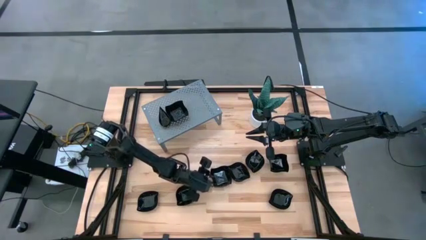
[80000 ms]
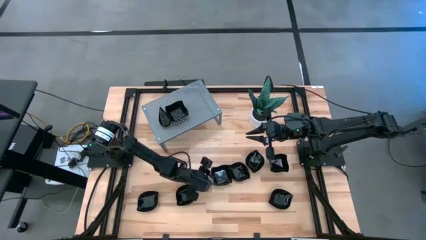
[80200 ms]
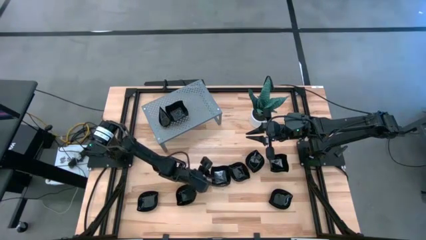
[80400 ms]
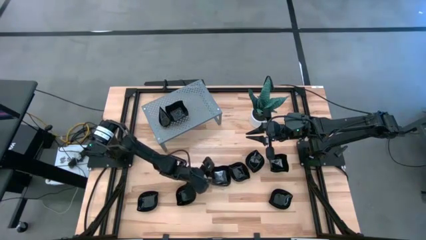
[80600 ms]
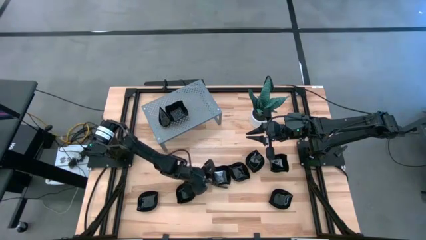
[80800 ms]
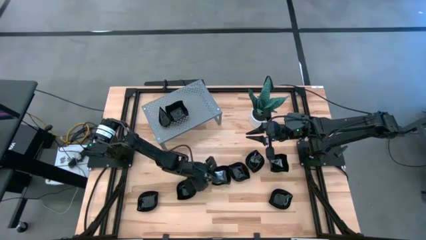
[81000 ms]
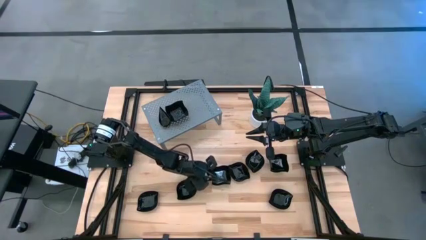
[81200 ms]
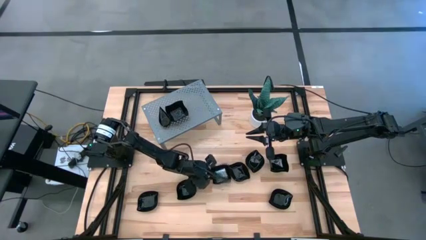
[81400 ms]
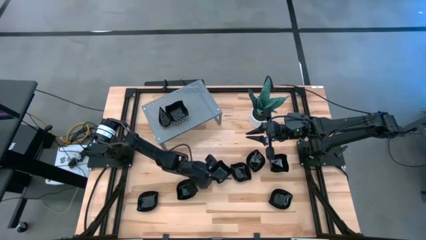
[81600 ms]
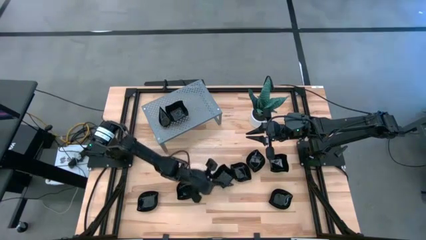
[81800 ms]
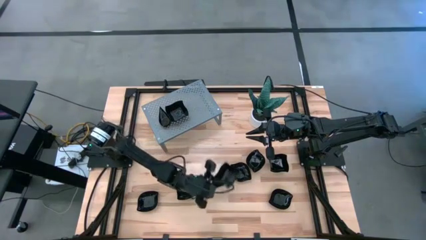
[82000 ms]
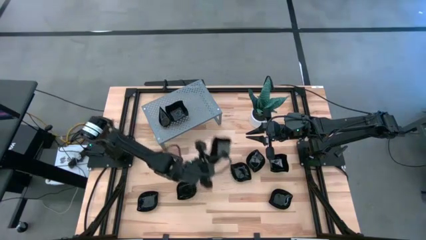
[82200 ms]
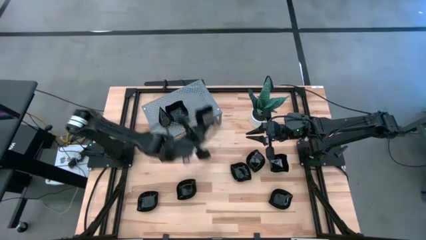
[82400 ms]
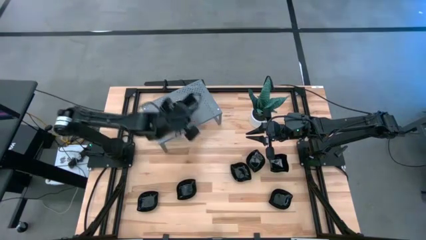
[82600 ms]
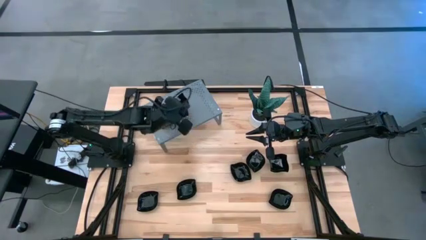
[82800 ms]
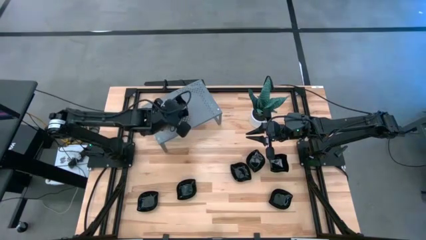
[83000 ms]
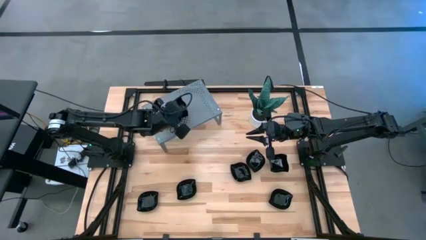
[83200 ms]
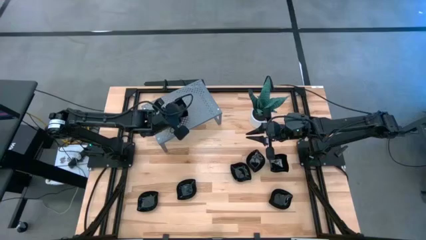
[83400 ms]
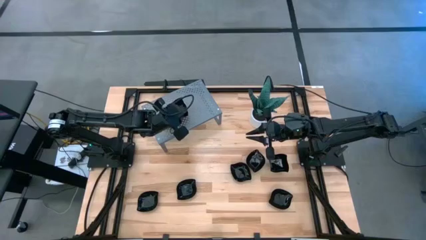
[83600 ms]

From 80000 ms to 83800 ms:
Task: Pick & Place Mini shaped plates
Stack the black distorted square plate on the black distorted square plate on the shelf

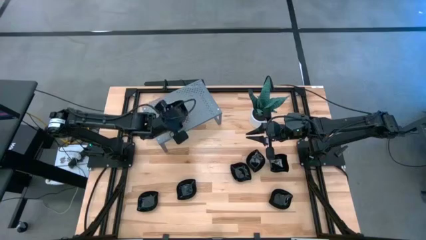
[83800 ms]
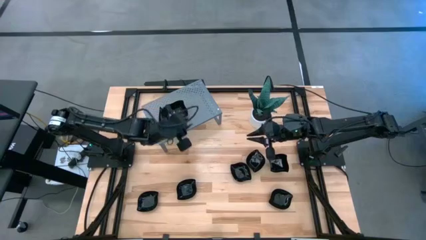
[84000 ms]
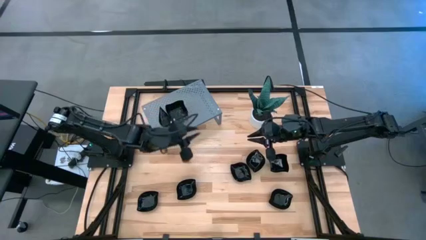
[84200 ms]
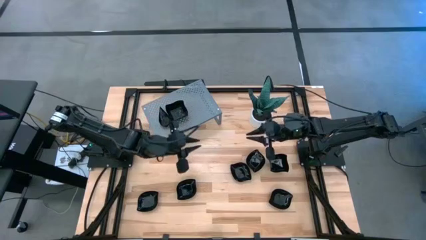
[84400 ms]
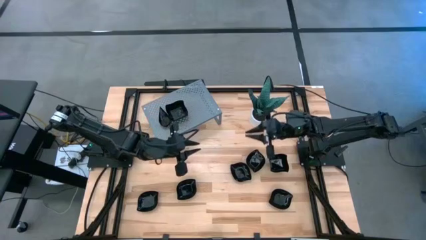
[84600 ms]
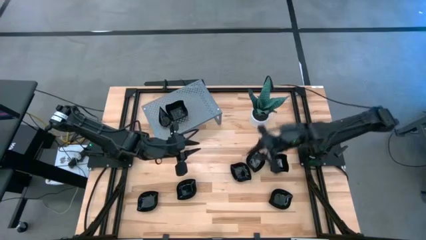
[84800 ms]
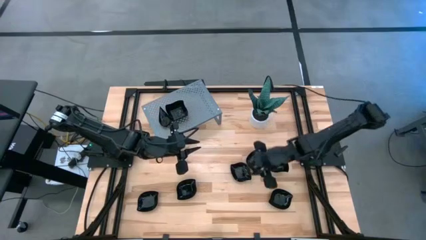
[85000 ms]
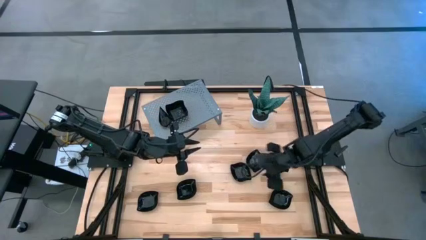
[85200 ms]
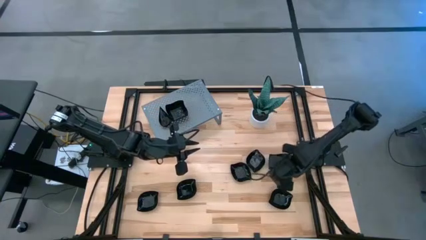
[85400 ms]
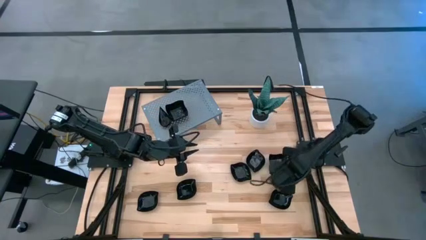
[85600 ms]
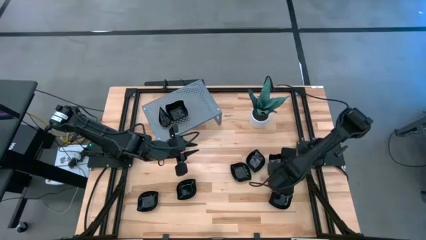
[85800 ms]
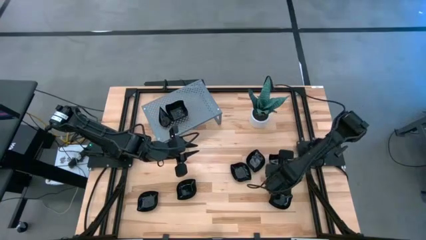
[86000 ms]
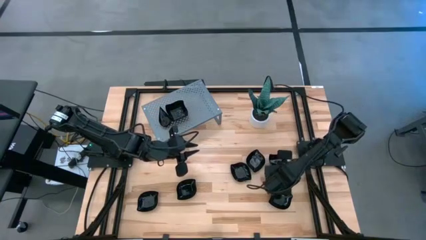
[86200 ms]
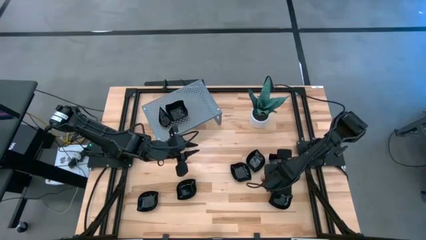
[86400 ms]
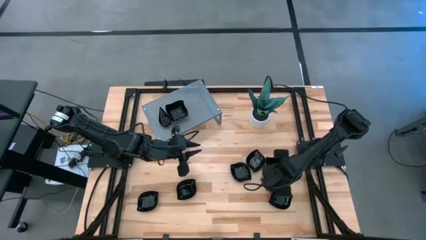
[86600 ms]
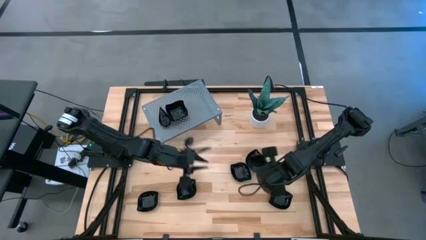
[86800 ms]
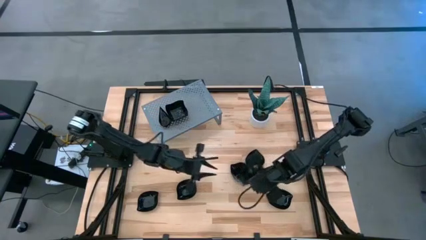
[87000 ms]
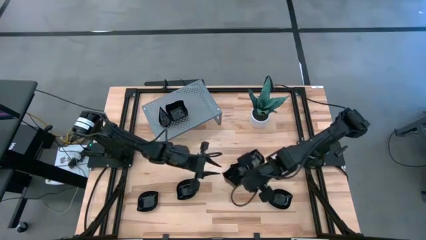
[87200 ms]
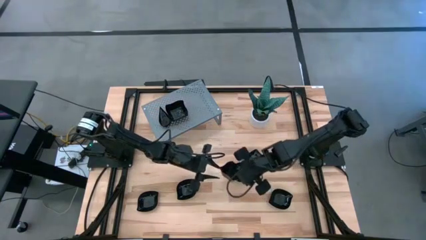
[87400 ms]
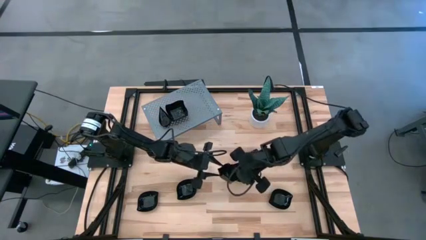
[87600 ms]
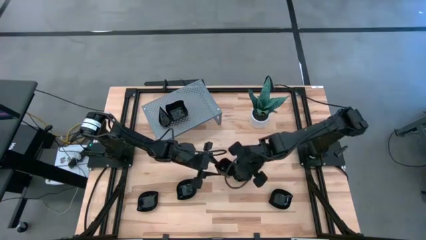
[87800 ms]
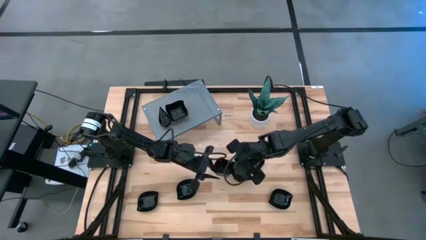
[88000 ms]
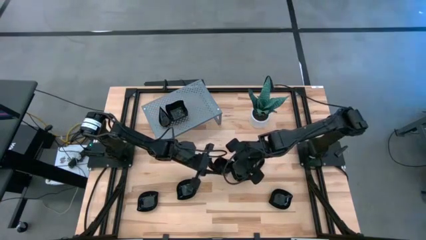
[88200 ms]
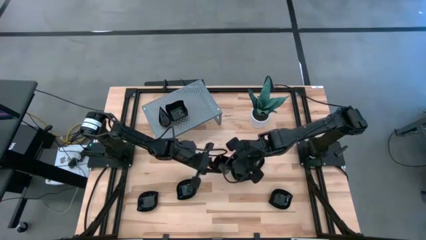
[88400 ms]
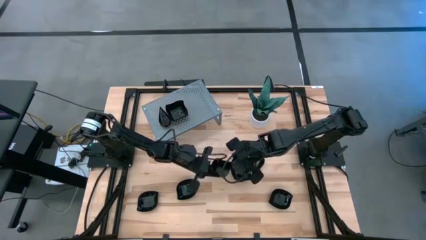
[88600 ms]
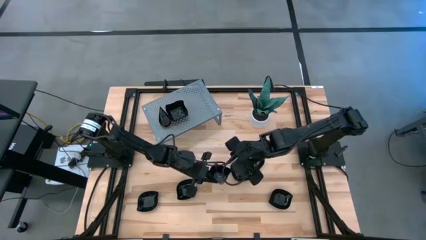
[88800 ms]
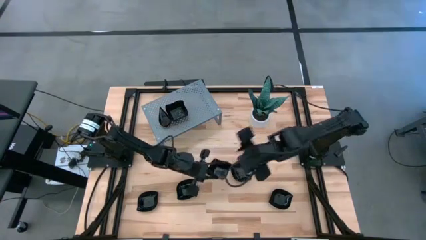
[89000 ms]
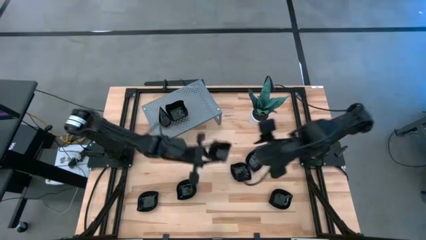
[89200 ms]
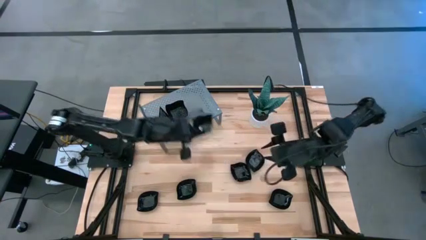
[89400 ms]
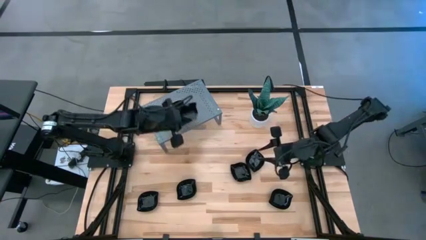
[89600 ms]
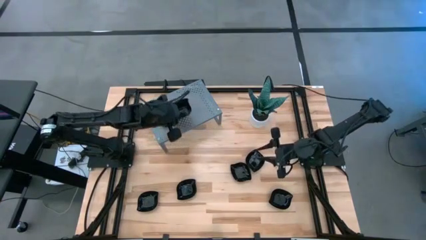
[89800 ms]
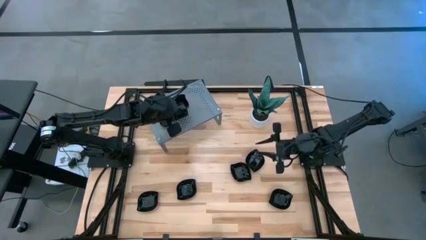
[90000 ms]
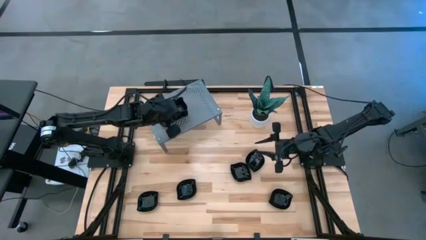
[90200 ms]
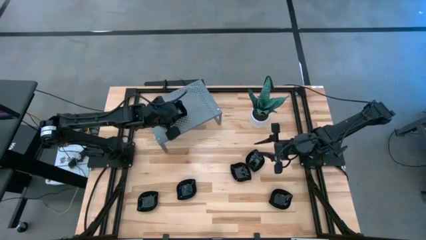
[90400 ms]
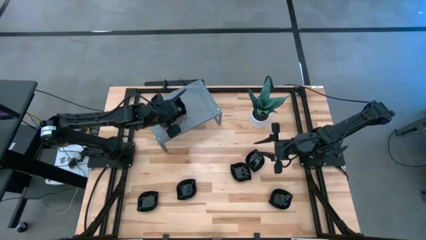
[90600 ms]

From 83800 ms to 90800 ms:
Stack the black distorted square plate on the black distorted square plate on the shelf

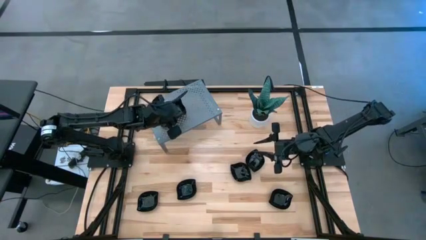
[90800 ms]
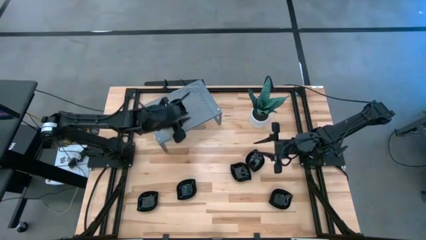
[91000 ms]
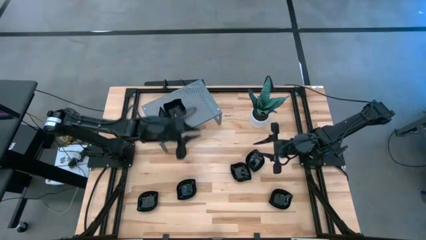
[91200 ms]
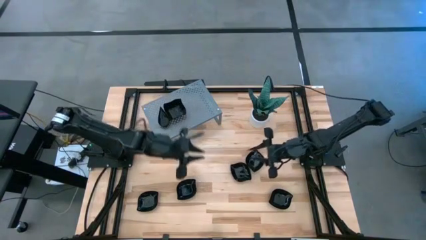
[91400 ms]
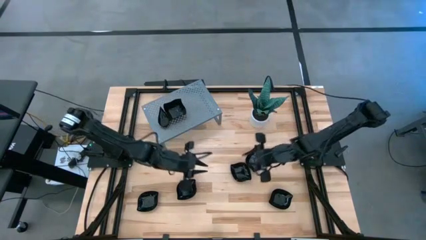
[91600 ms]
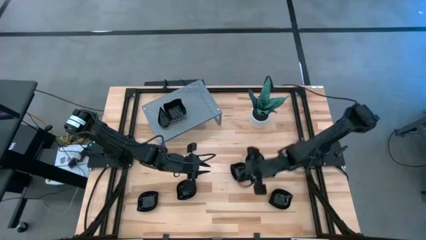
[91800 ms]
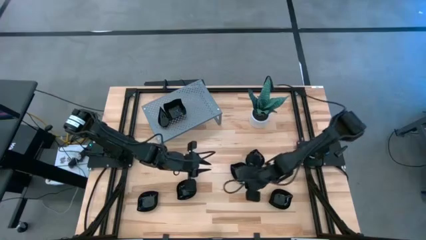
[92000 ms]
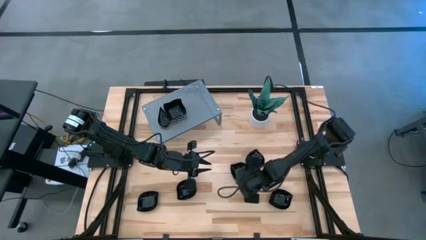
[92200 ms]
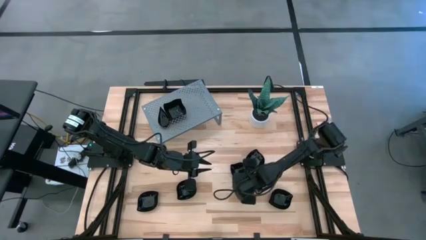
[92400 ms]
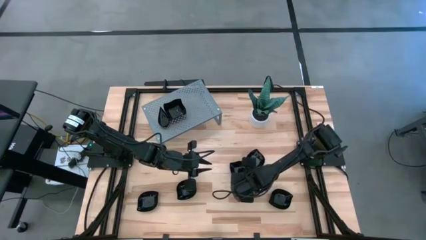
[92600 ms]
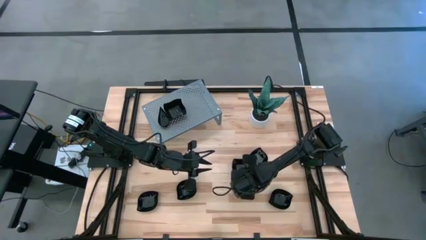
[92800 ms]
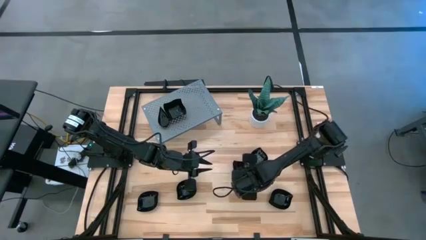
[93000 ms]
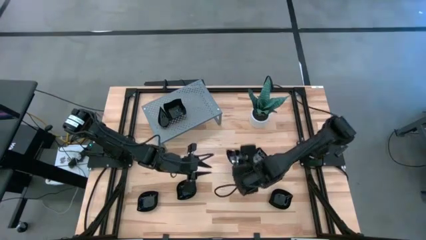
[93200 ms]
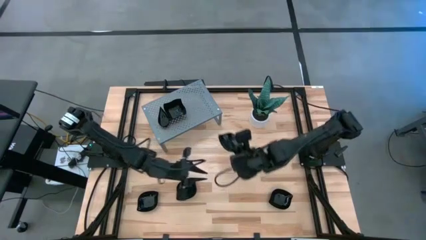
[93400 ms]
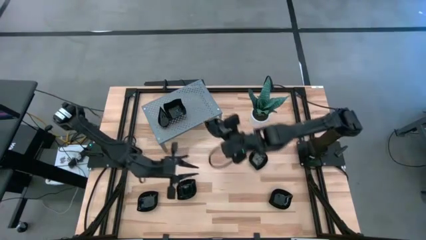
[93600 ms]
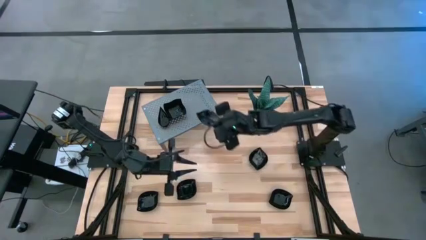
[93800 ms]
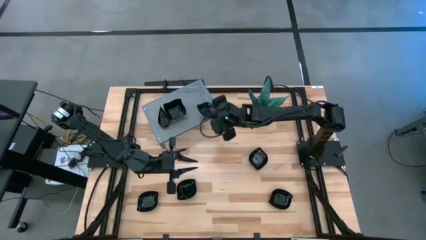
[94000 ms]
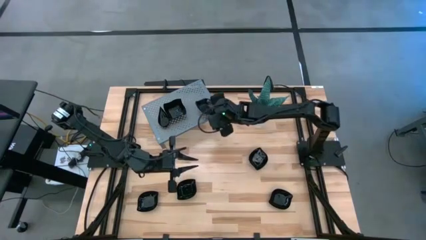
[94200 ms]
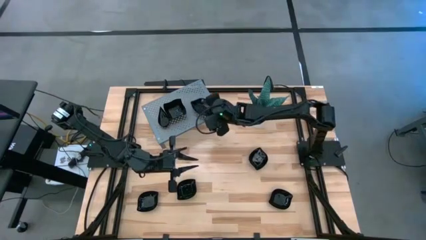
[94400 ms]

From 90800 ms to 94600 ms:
Put the black leaf-shaped plate on the shelf

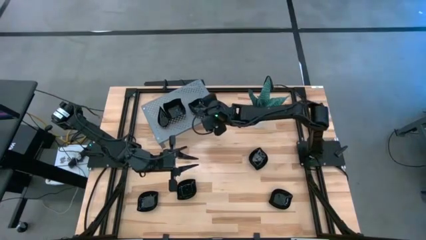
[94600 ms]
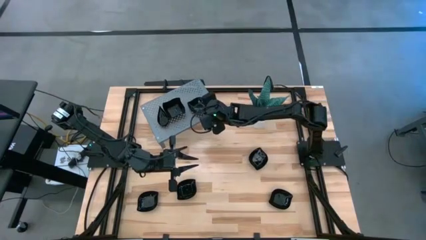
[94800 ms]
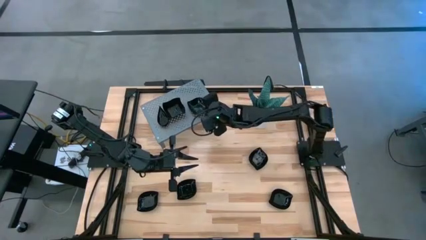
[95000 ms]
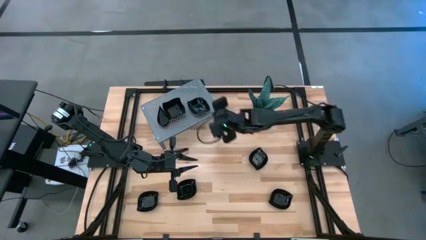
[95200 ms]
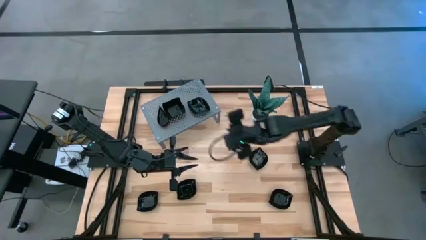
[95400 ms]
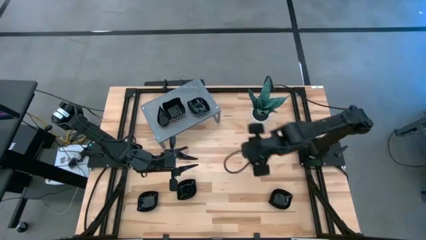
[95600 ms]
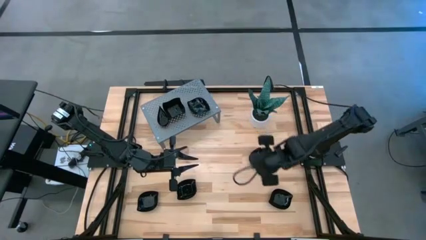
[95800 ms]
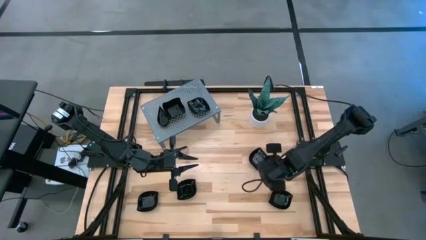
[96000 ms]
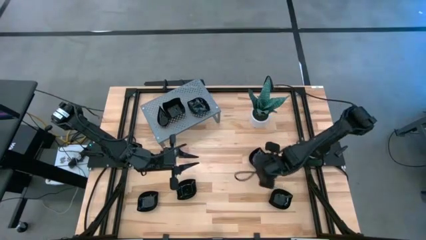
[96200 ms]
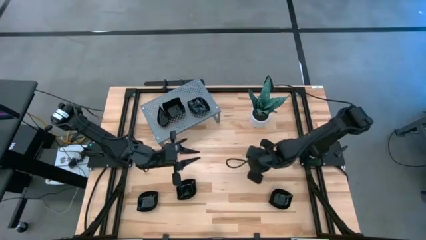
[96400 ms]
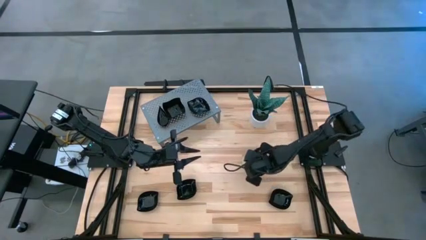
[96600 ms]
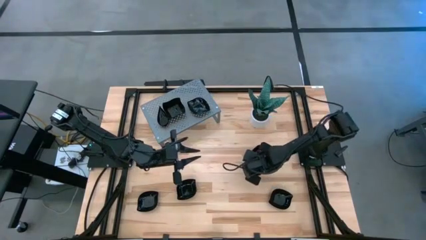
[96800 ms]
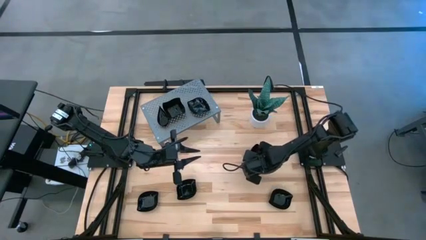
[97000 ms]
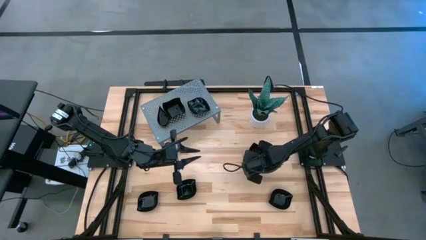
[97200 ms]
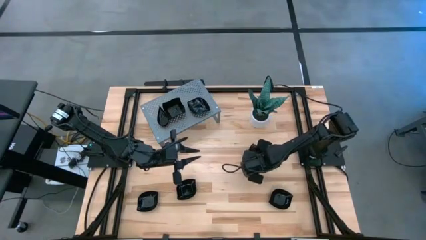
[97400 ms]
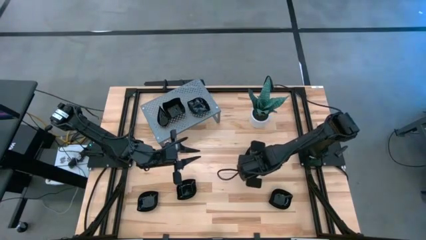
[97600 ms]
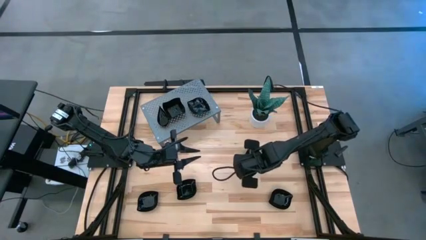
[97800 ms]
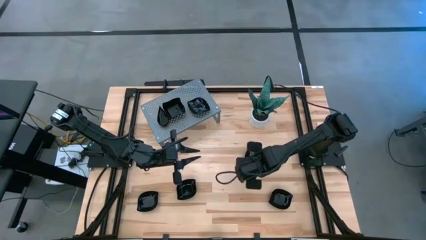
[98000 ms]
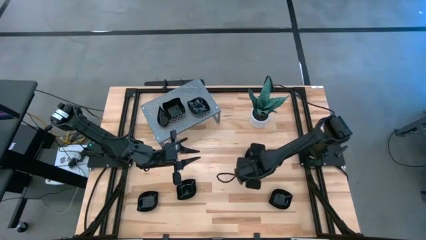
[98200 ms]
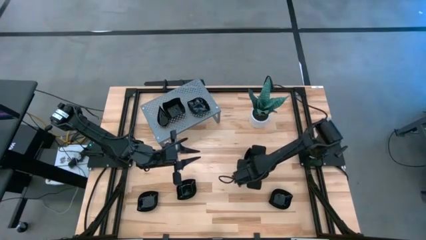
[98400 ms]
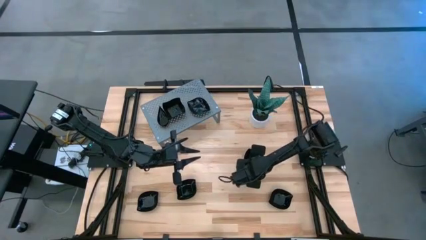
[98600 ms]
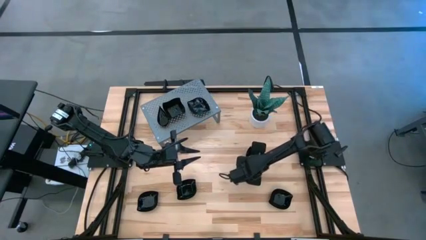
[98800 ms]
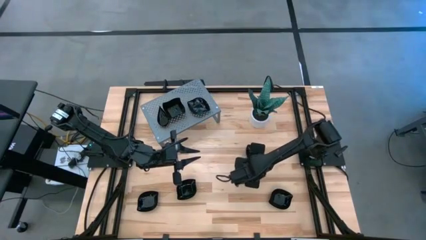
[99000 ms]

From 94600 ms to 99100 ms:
Stack the black leaf-shaped plate on the black leaf-shaped plate on the shelf
